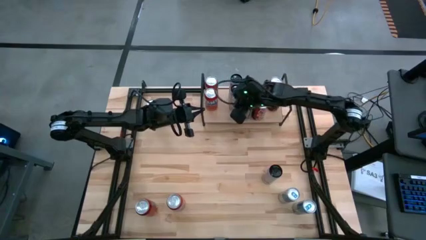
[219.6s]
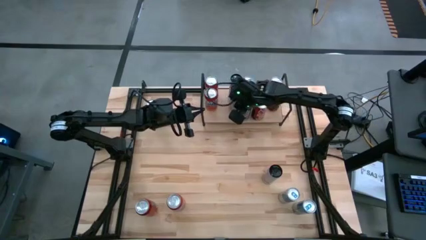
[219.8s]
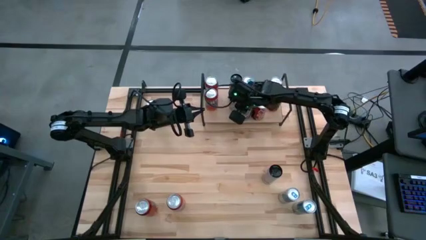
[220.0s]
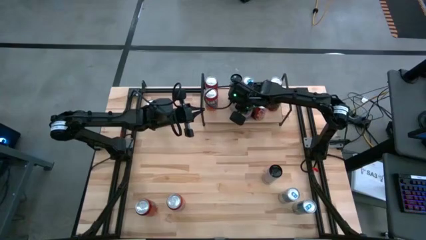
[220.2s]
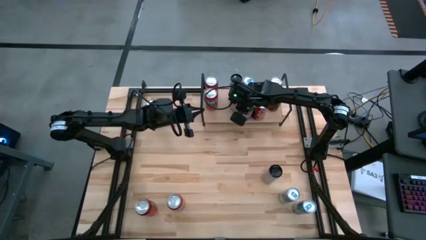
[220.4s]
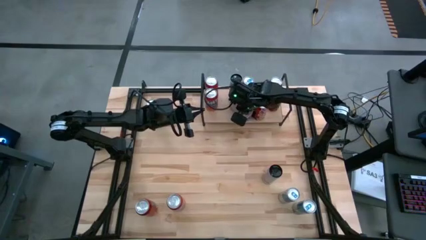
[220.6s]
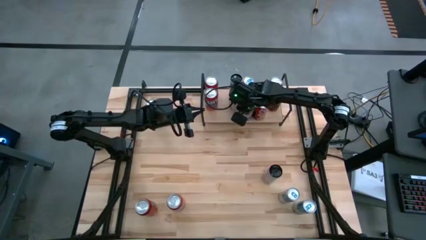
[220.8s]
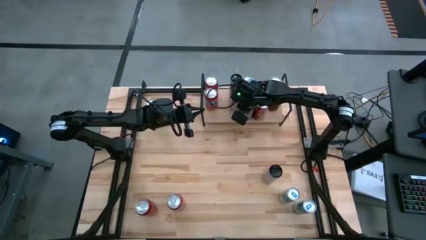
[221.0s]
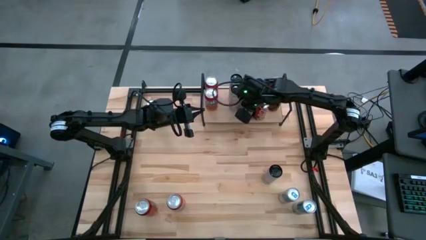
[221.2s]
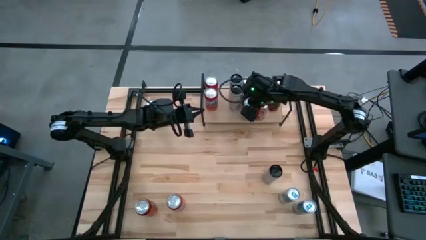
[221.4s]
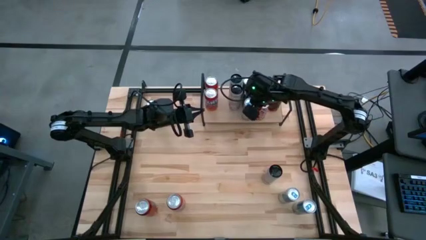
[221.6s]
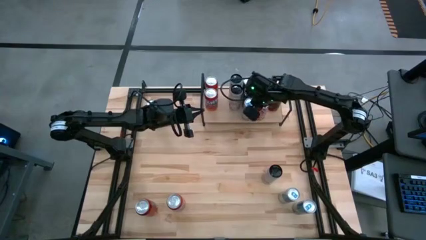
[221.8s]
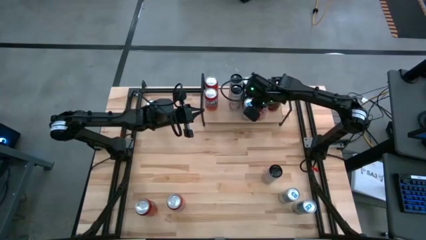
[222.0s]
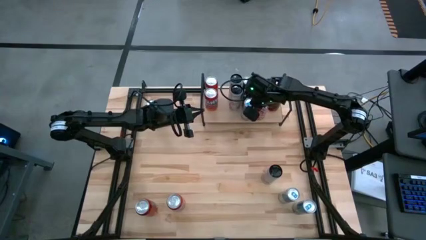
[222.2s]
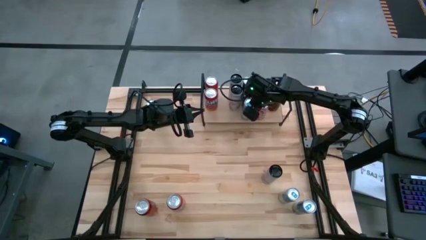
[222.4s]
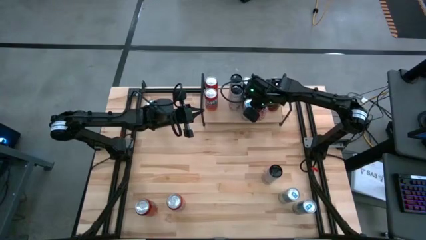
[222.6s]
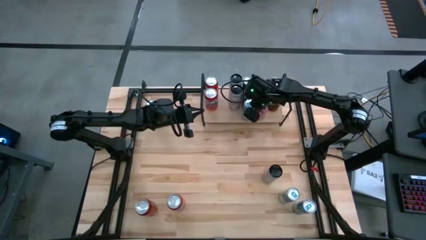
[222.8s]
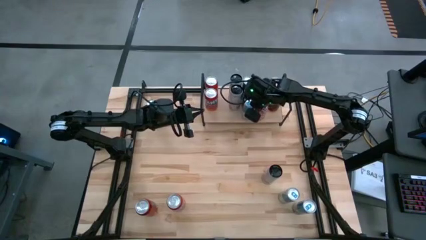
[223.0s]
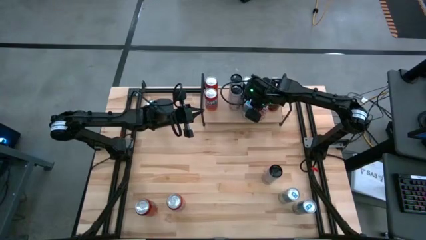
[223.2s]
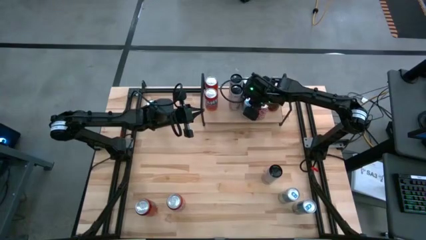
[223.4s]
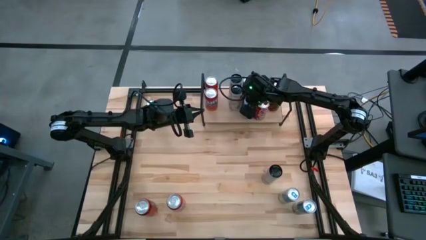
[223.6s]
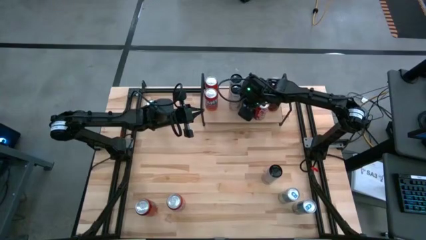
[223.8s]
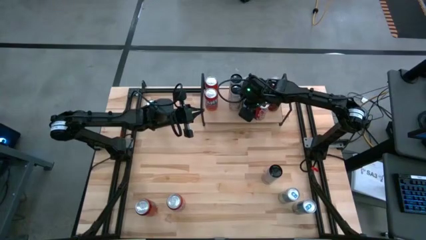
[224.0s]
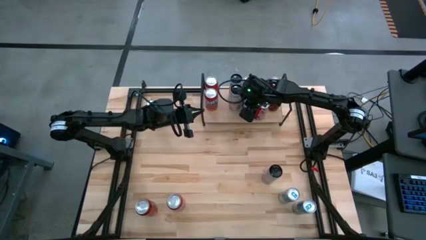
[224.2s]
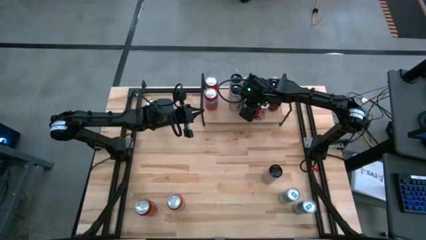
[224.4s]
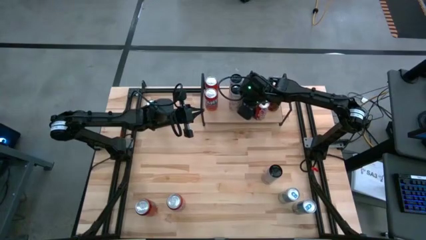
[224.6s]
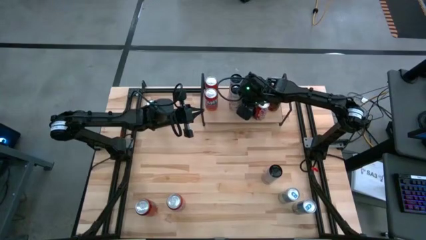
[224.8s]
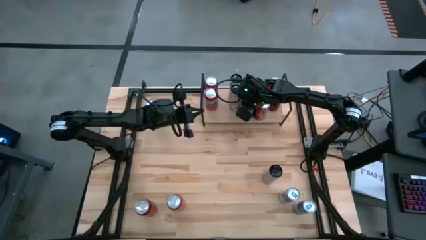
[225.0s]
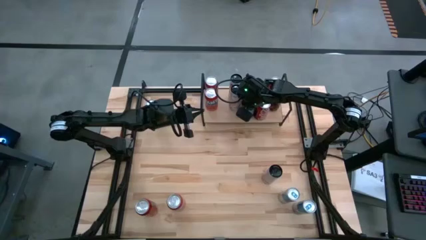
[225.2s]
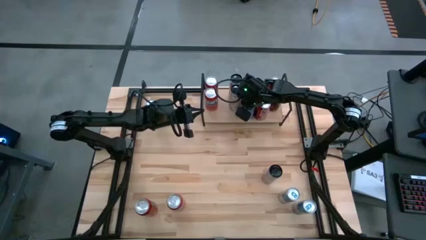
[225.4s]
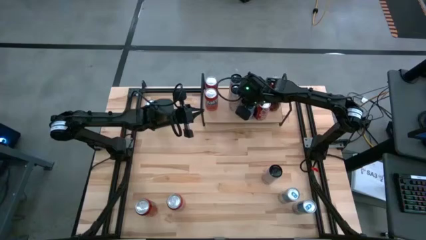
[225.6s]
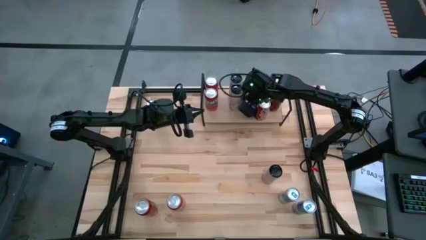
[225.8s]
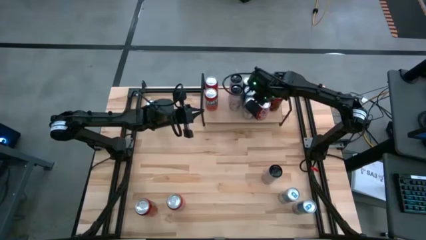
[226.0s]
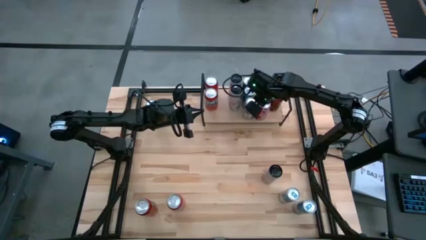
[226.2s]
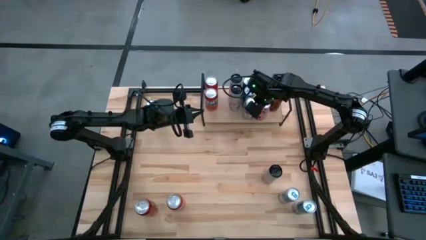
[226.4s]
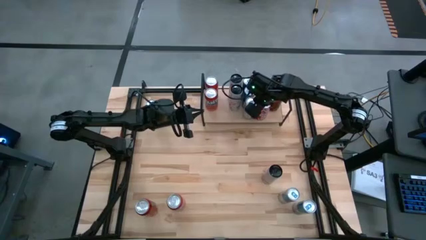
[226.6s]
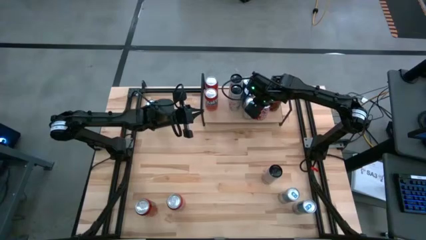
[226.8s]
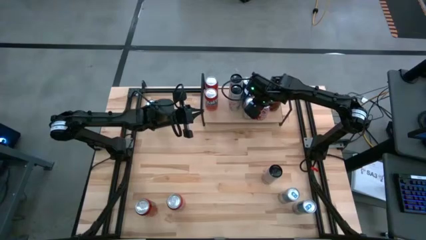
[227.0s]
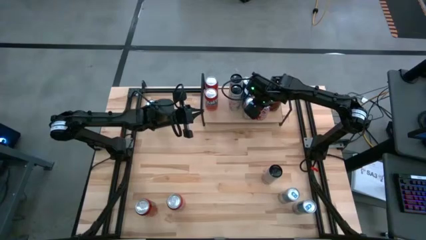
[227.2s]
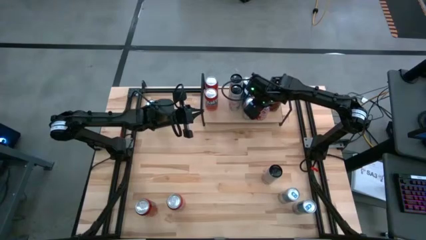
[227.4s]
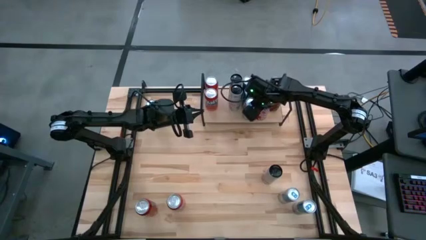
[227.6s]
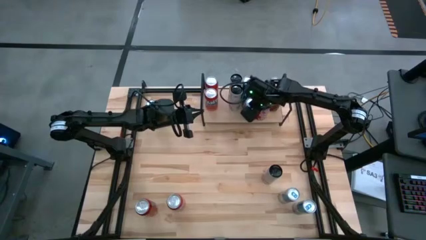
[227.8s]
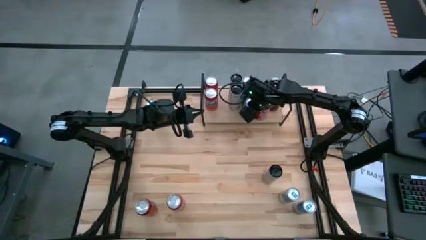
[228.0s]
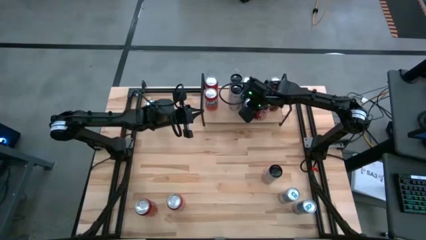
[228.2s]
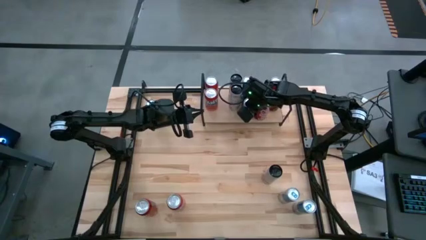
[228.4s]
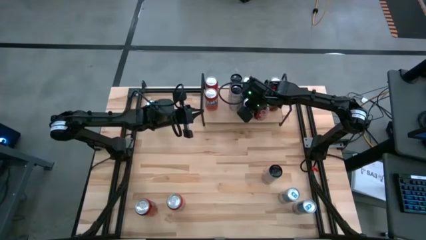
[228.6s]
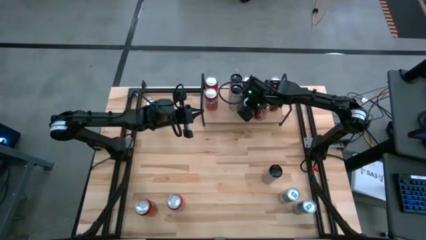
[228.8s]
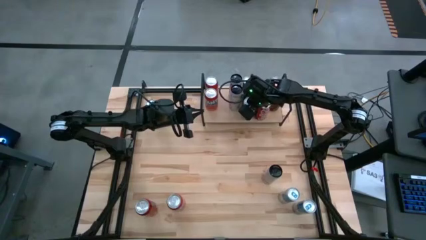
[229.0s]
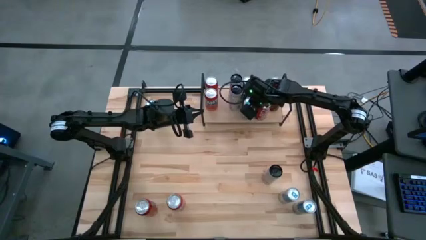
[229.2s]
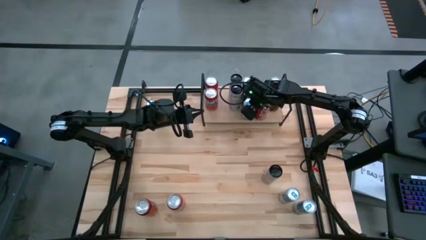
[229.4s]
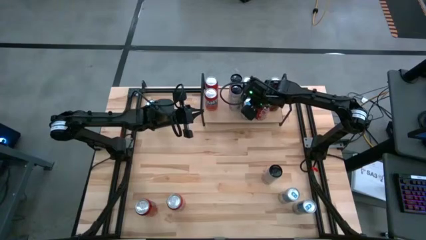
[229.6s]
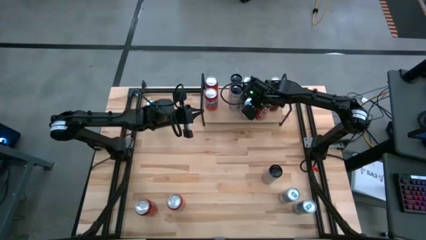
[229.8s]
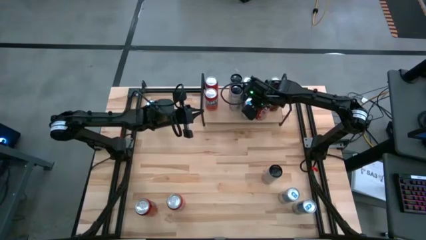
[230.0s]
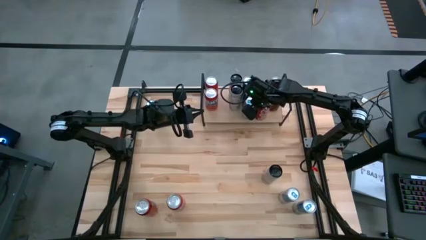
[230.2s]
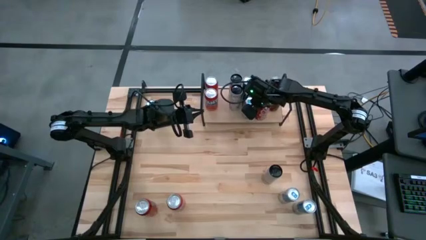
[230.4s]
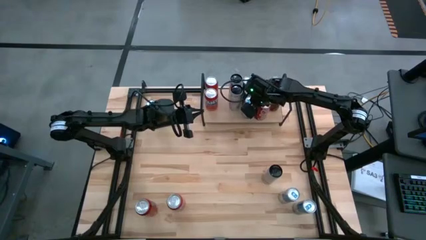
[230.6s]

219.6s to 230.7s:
Task: Place canned beverage on shelf
Put the blue soda can on the shelf

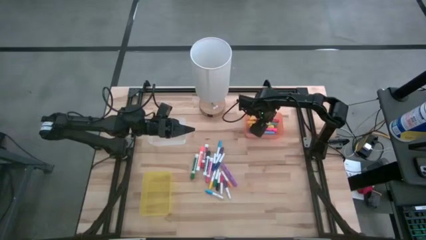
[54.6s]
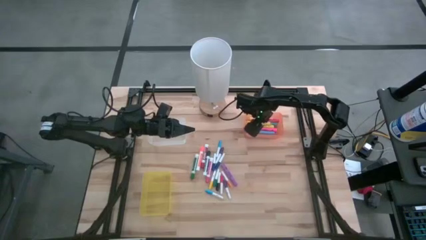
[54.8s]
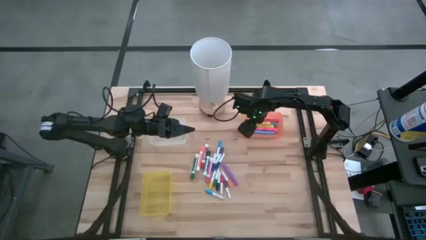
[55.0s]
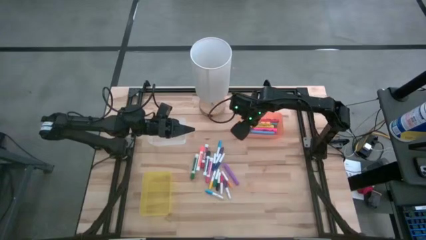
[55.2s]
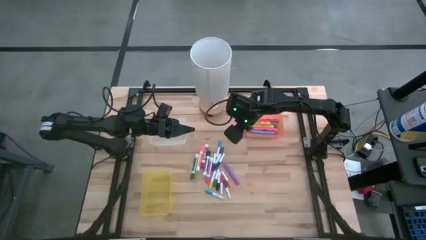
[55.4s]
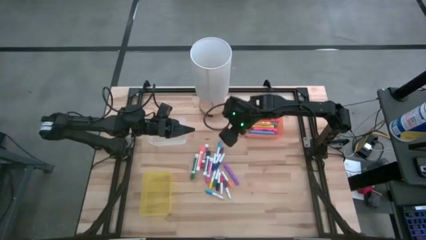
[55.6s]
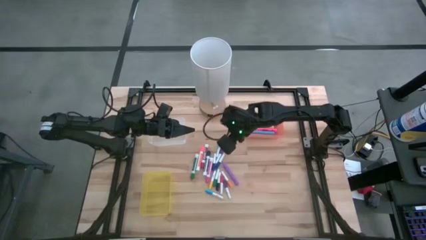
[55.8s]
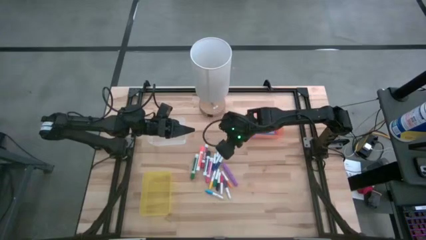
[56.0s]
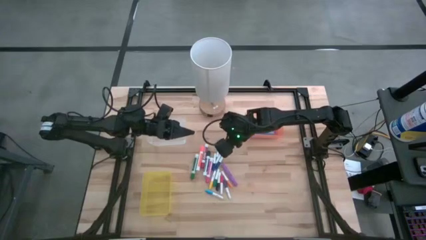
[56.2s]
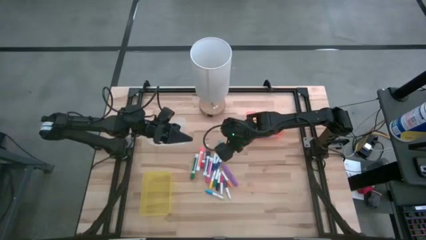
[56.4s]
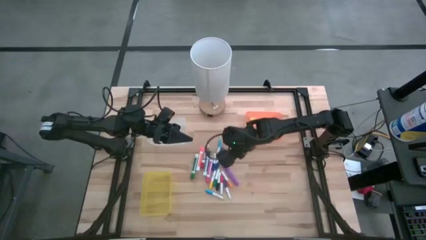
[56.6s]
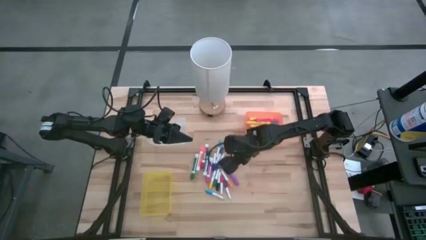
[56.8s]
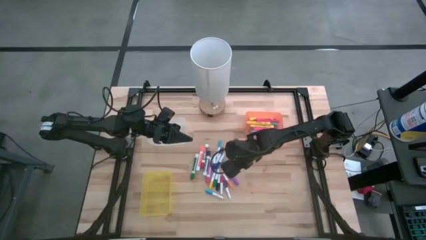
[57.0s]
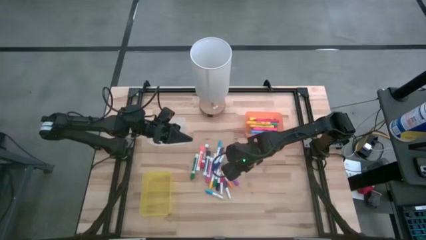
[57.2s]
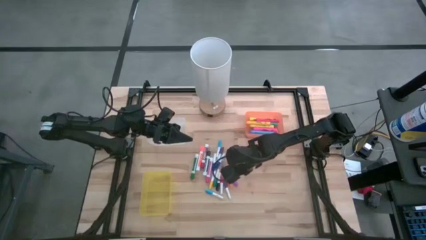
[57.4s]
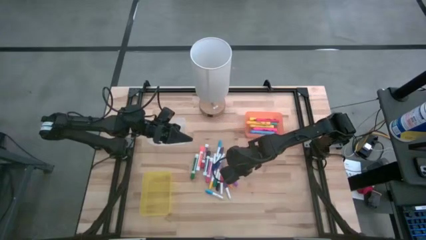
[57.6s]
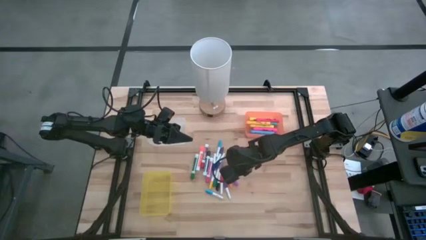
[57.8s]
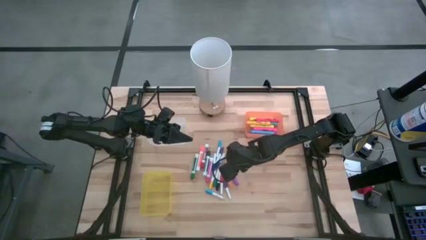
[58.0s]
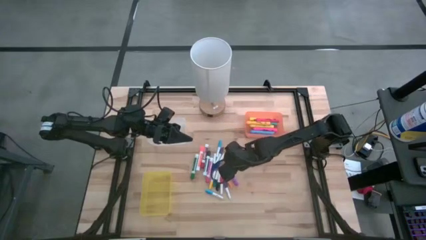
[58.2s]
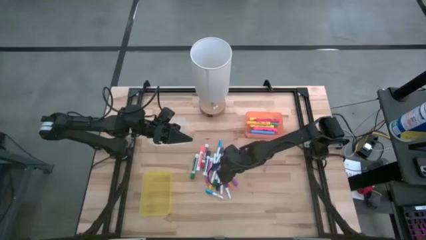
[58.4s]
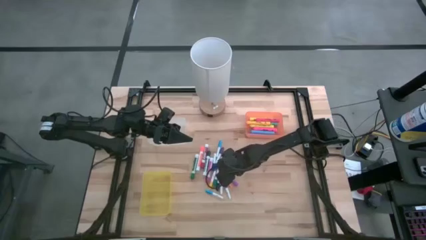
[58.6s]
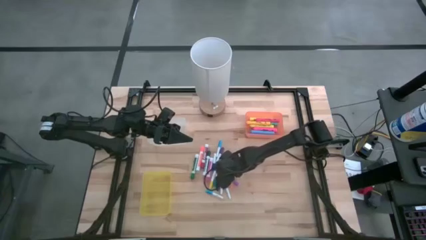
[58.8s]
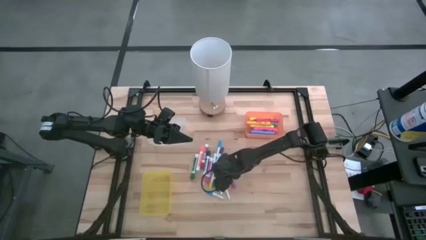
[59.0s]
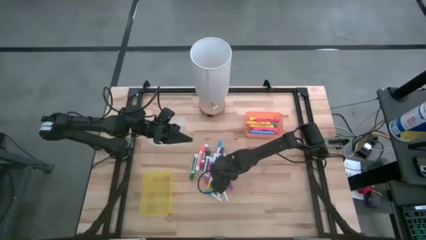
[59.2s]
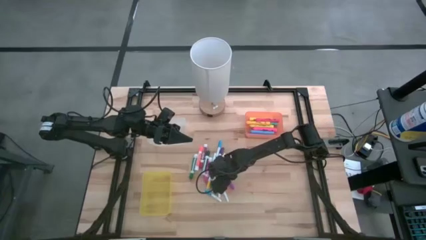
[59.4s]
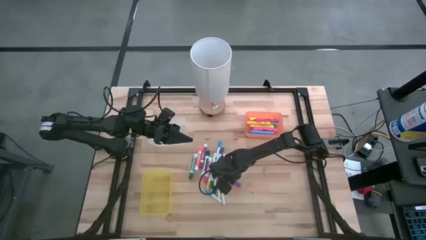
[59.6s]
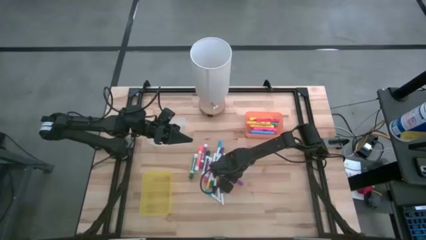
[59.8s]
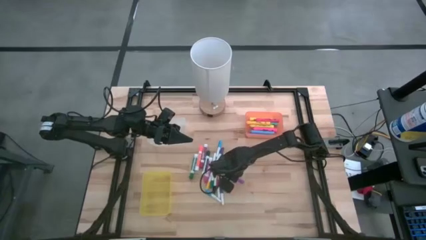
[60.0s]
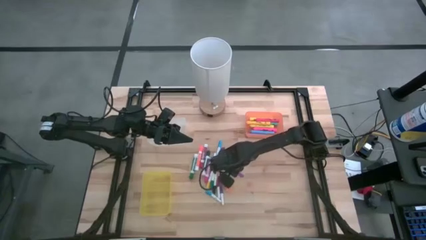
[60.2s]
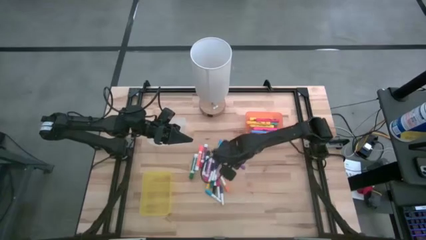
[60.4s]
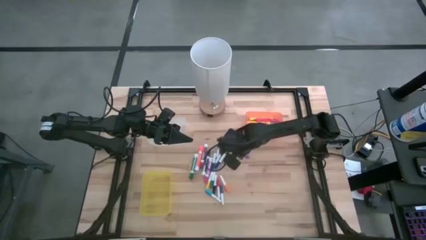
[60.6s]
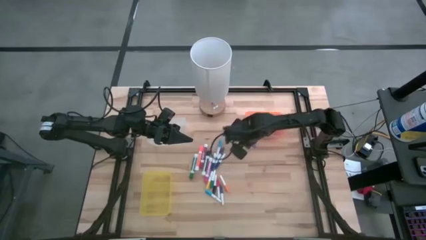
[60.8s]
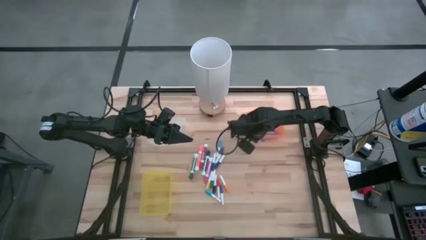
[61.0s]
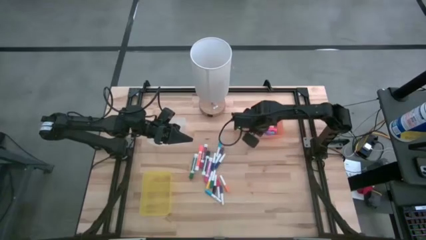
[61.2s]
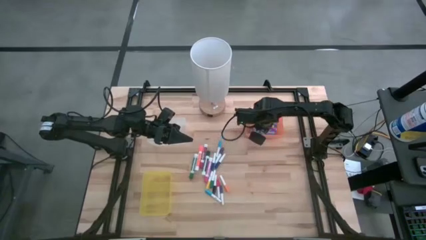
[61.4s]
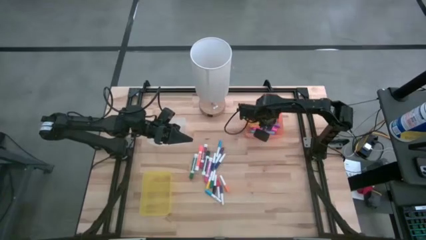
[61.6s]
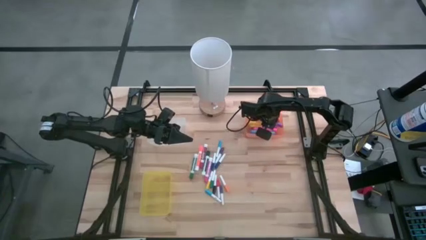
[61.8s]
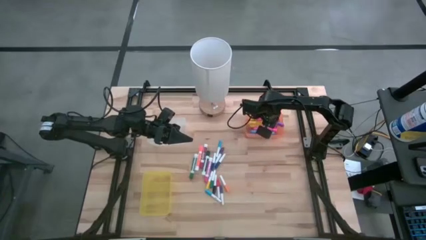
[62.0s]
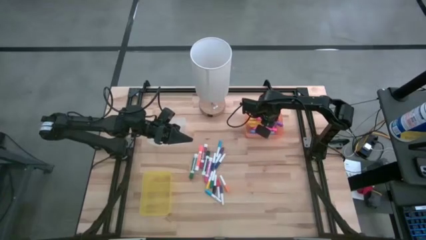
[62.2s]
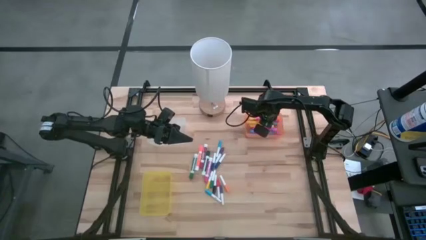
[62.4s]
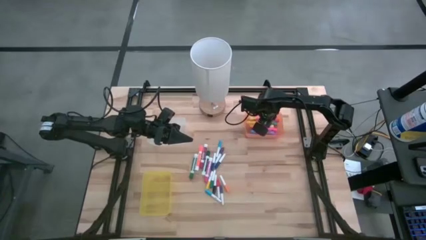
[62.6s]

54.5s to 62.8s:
Task: Pick & Place Markers
Put the purple highlighter pen into the orange bin
